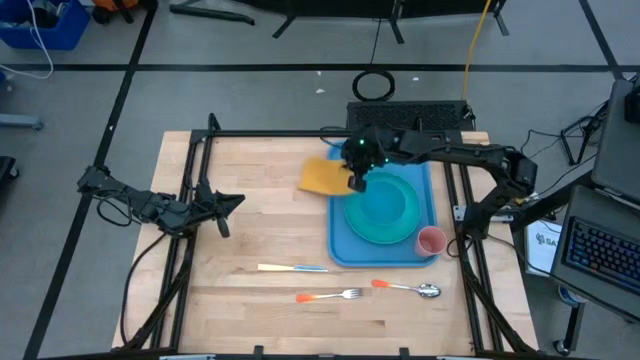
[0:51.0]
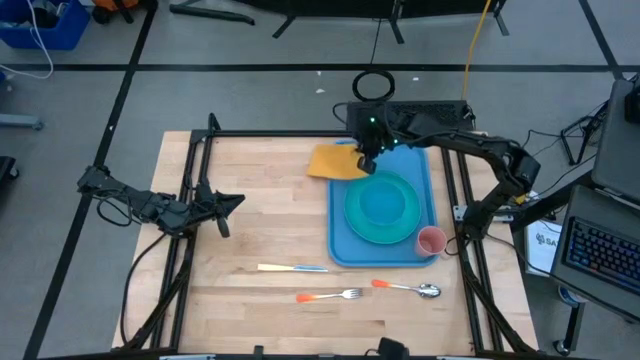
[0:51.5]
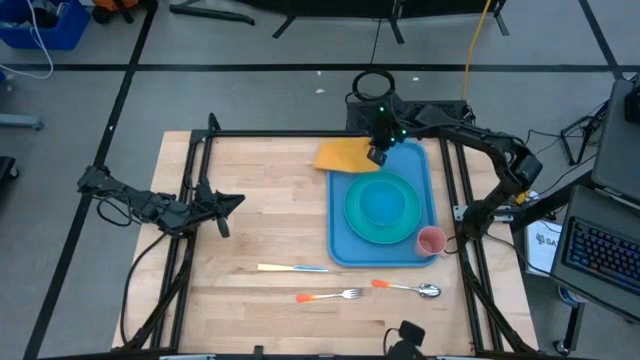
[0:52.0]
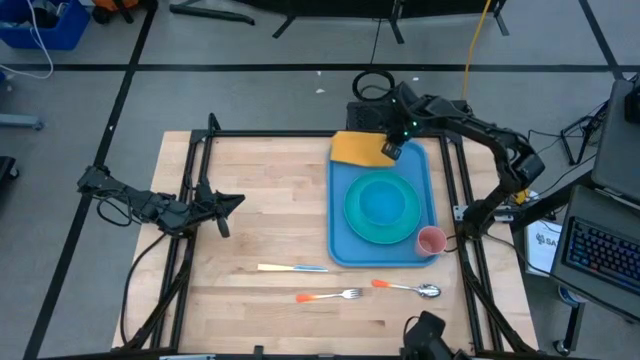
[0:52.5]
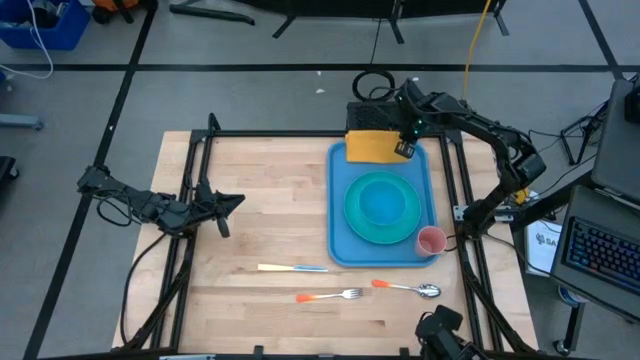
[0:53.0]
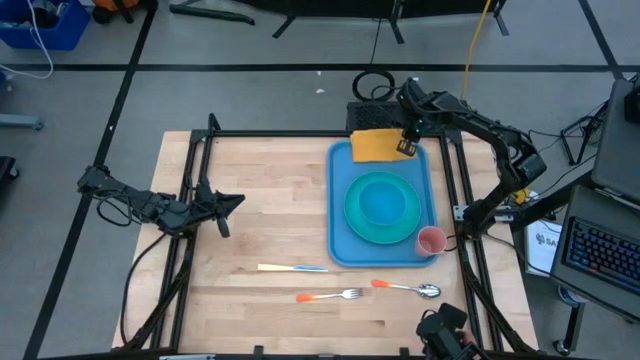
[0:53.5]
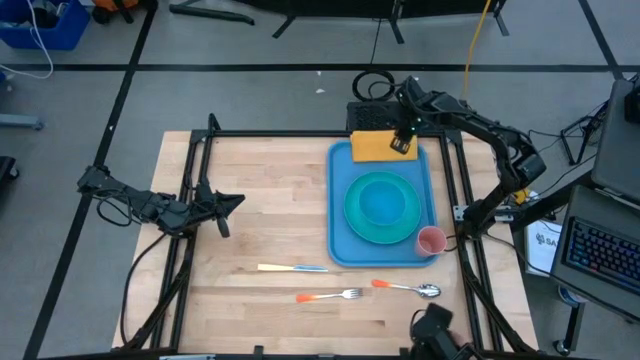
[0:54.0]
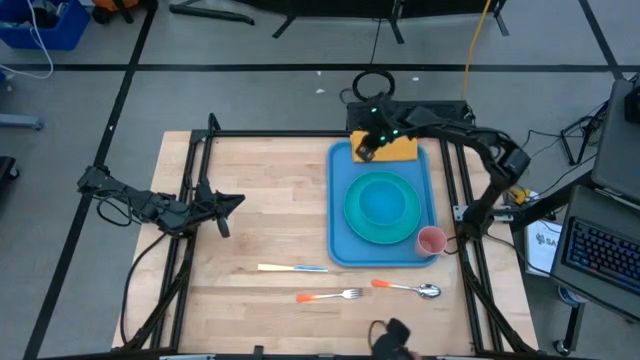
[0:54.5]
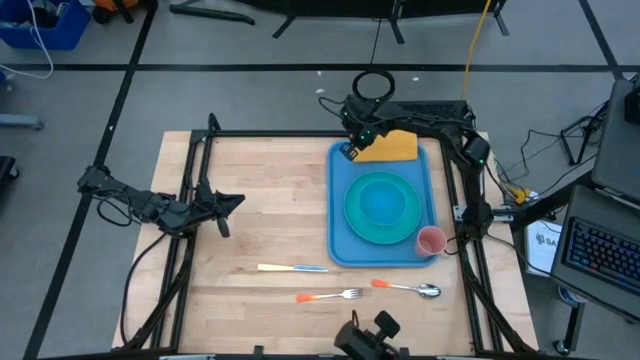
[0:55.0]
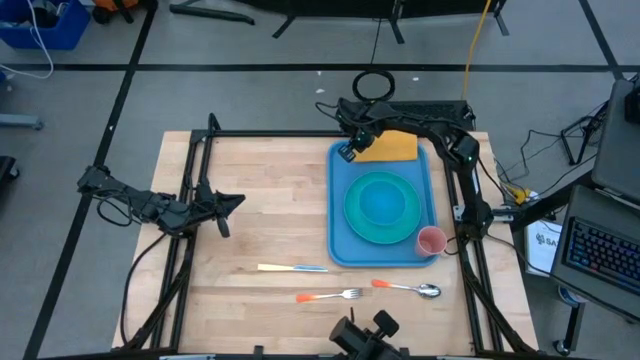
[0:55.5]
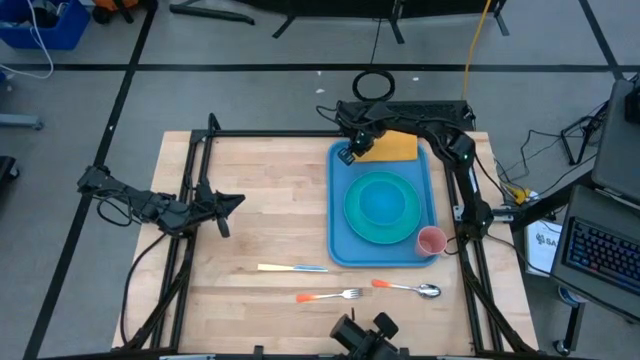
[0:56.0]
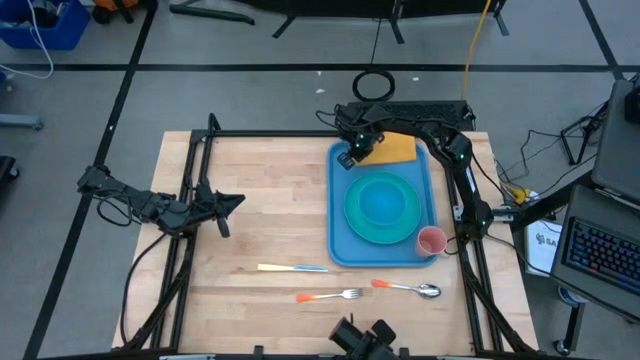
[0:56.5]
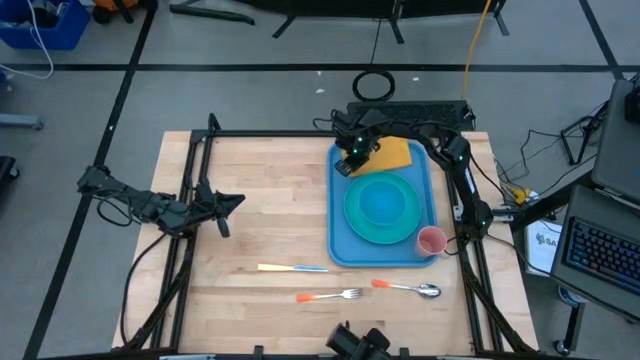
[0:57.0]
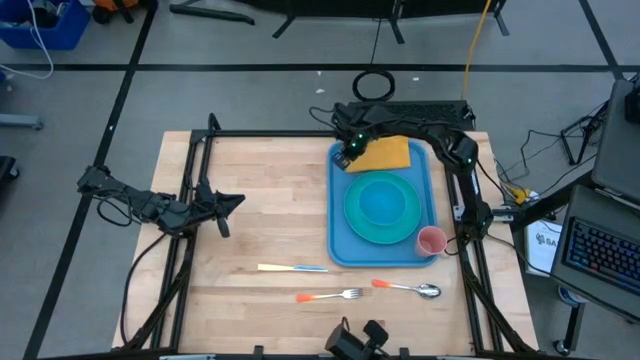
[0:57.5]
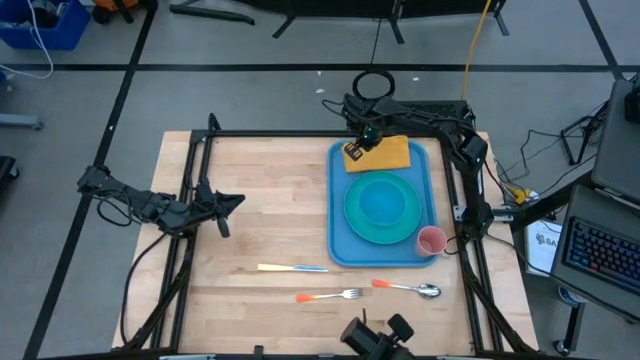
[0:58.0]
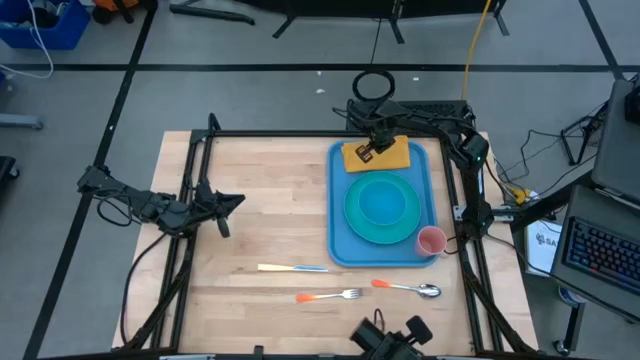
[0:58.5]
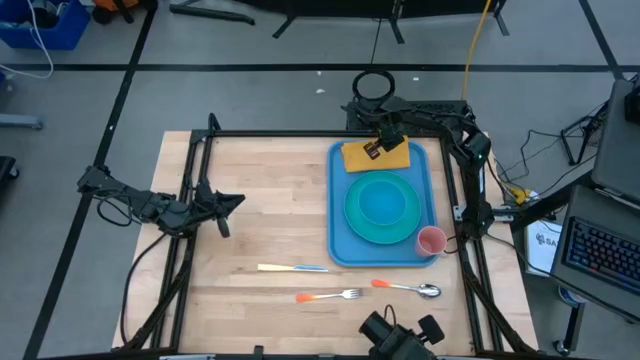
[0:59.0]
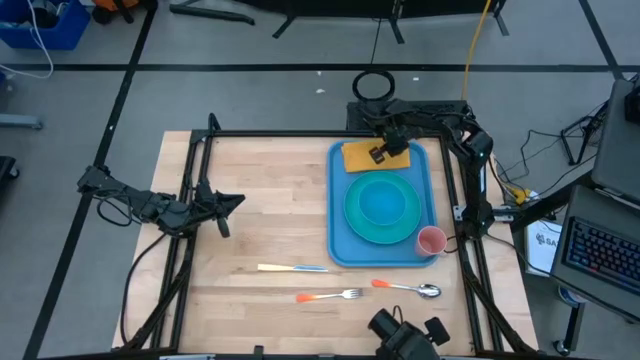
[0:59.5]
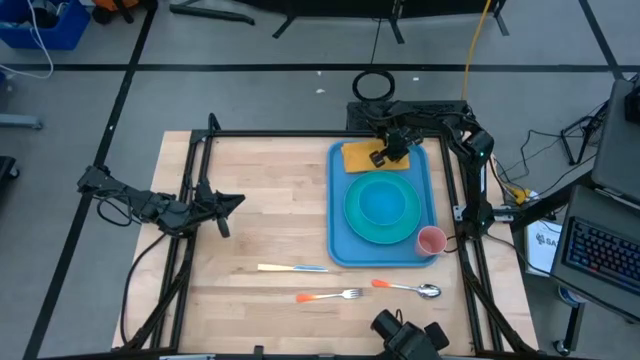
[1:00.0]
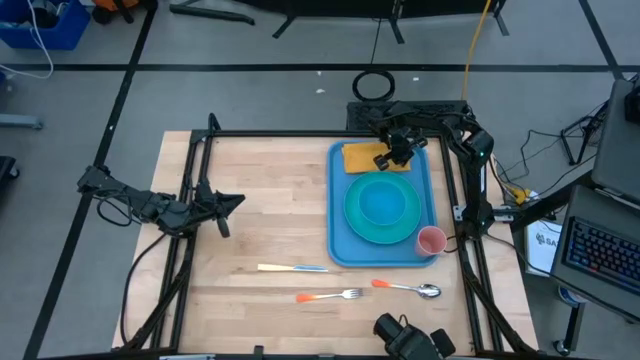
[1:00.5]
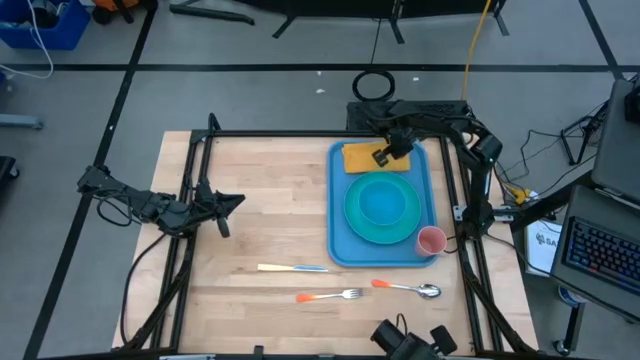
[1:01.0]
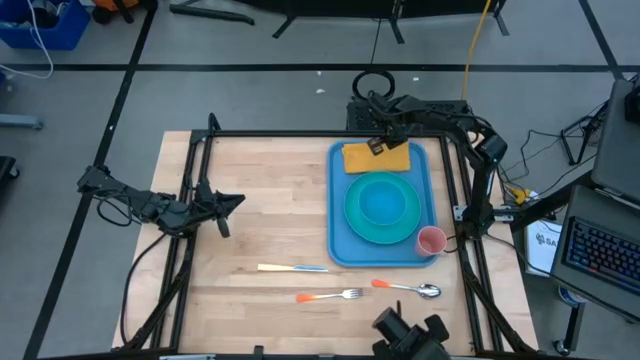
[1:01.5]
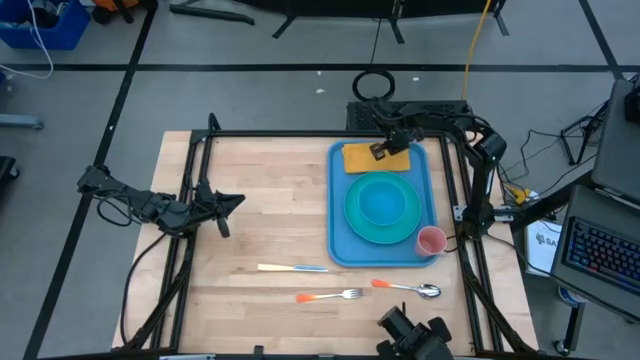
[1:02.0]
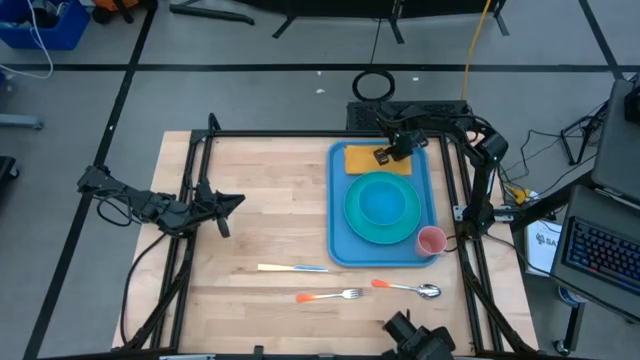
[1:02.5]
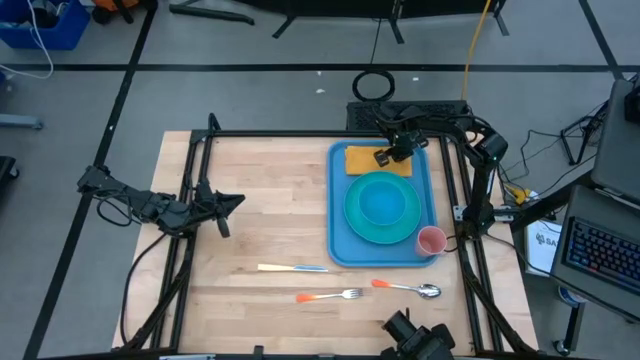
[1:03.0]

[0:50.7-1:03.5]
Task: Set up tray
Put the yellow table napkin to the left of the green plate on the blue serving tray

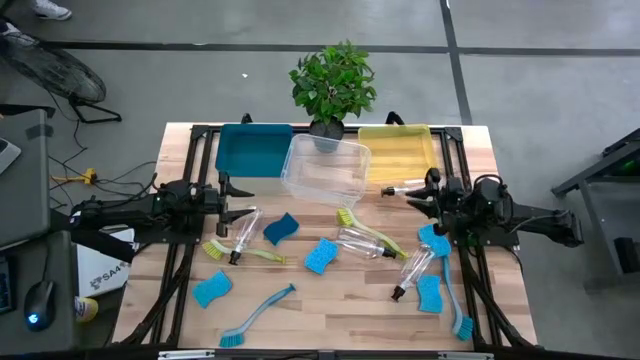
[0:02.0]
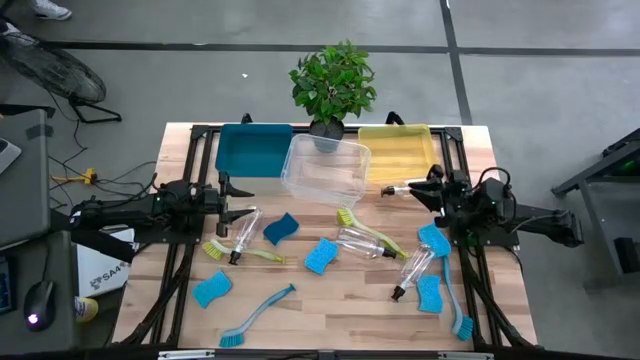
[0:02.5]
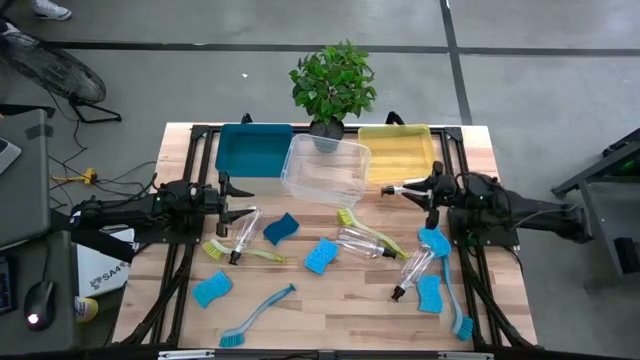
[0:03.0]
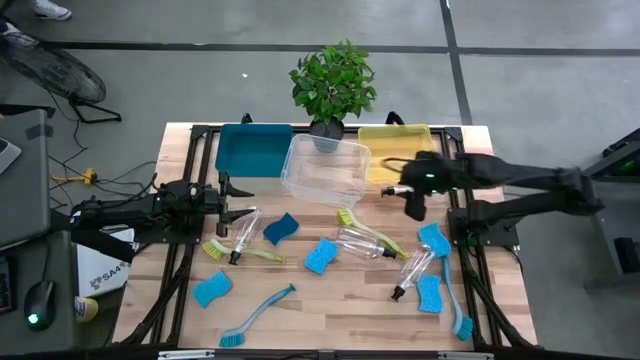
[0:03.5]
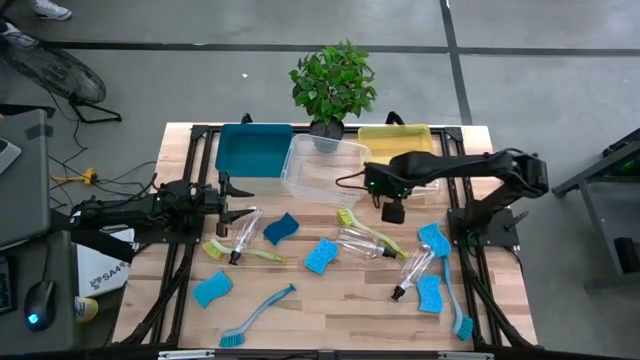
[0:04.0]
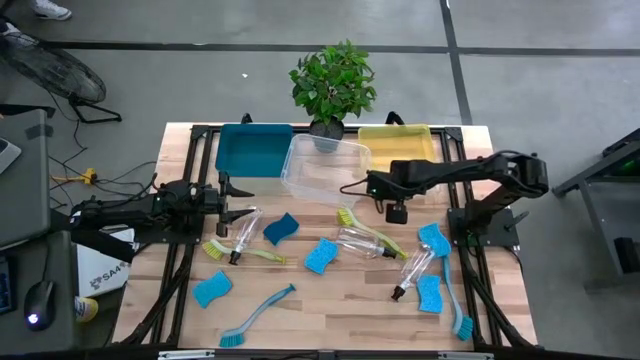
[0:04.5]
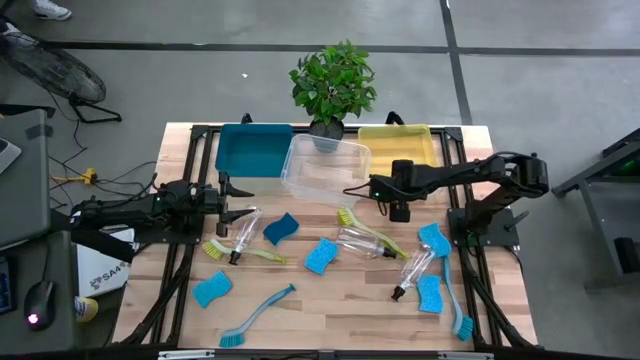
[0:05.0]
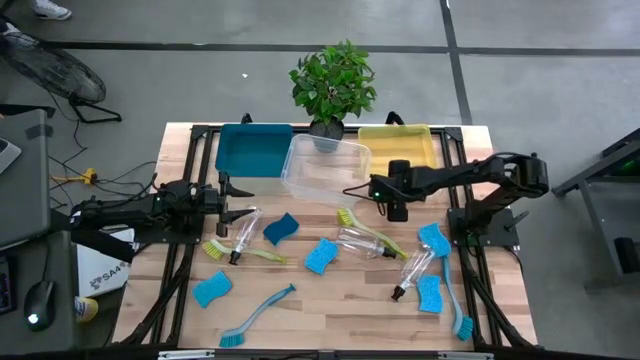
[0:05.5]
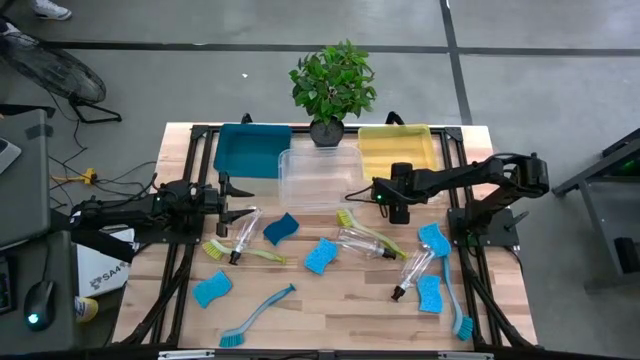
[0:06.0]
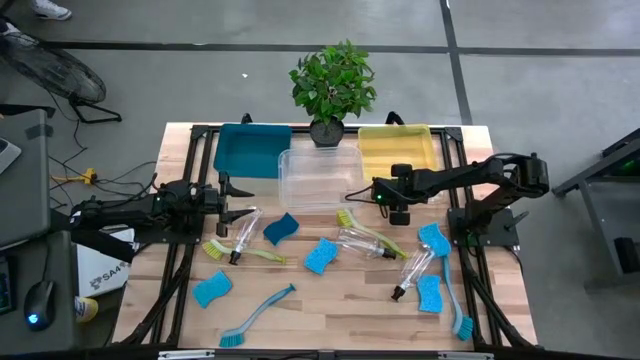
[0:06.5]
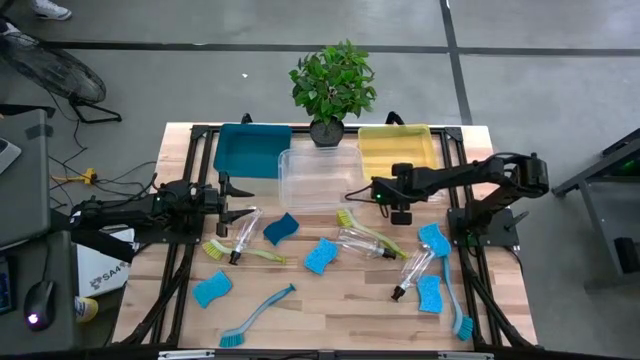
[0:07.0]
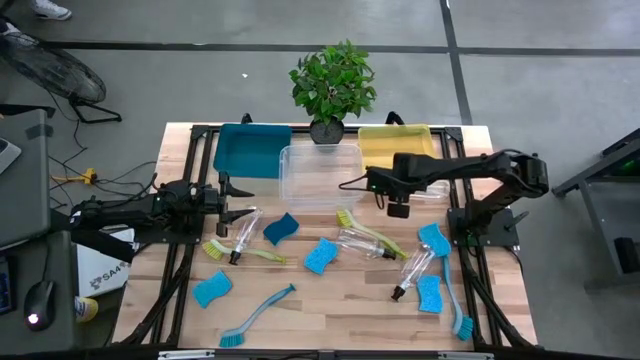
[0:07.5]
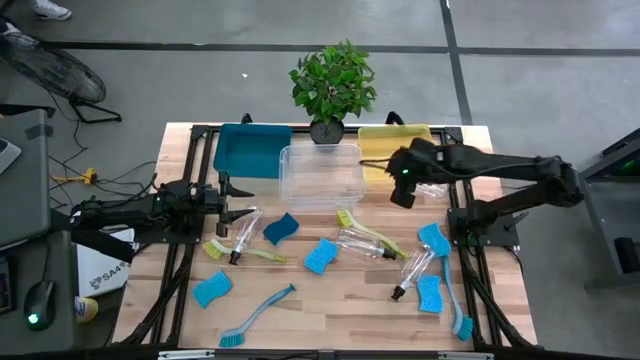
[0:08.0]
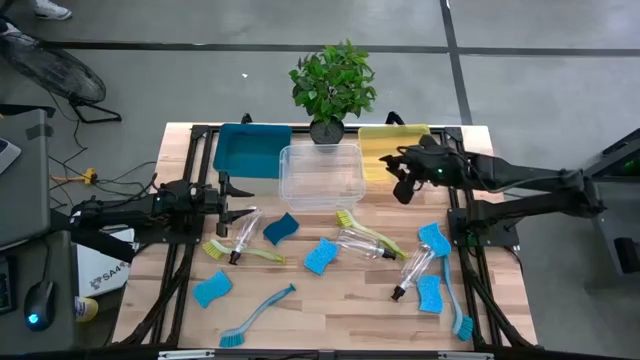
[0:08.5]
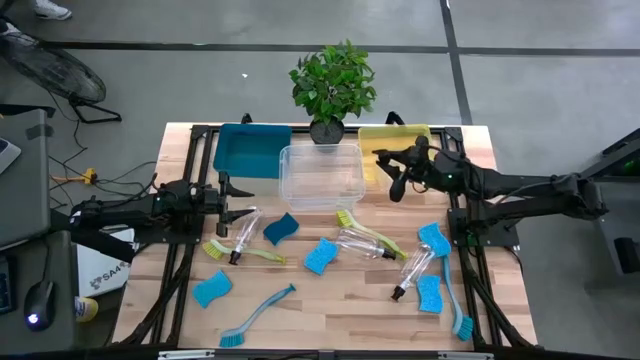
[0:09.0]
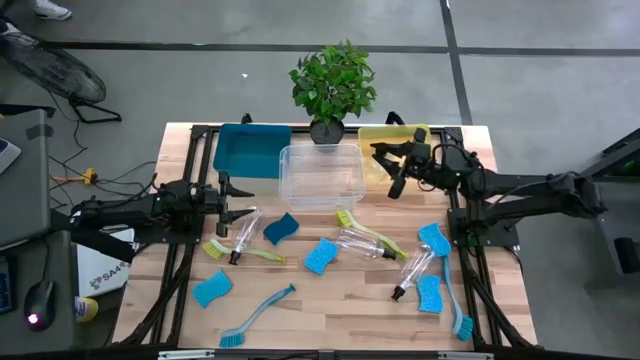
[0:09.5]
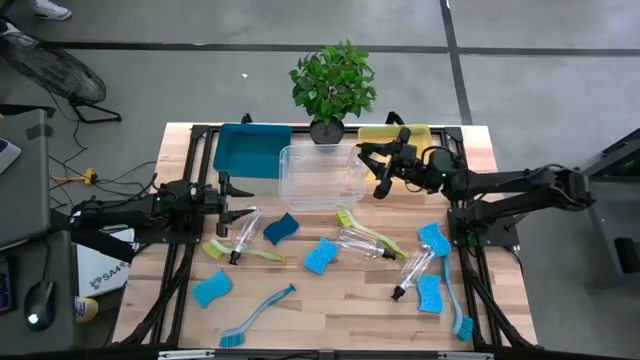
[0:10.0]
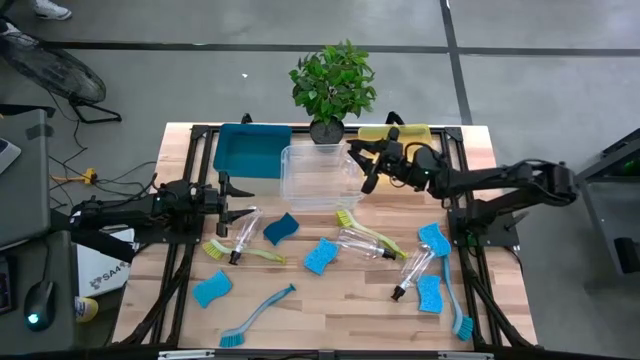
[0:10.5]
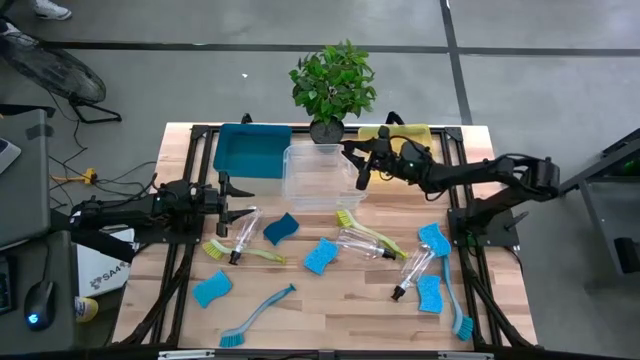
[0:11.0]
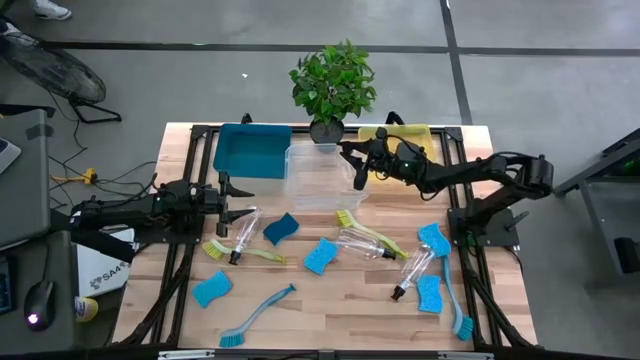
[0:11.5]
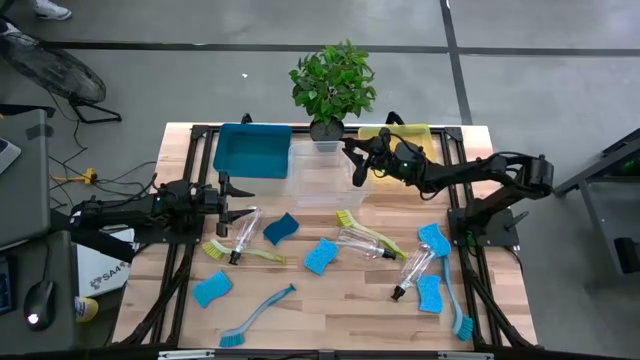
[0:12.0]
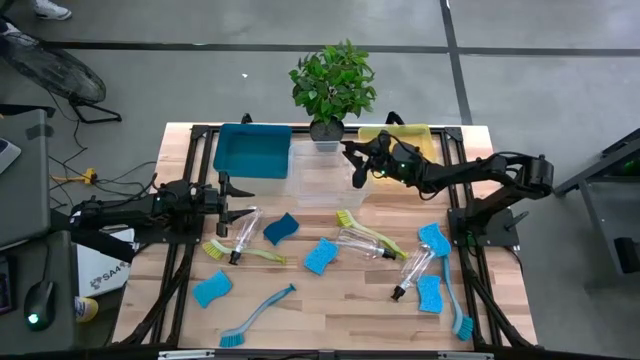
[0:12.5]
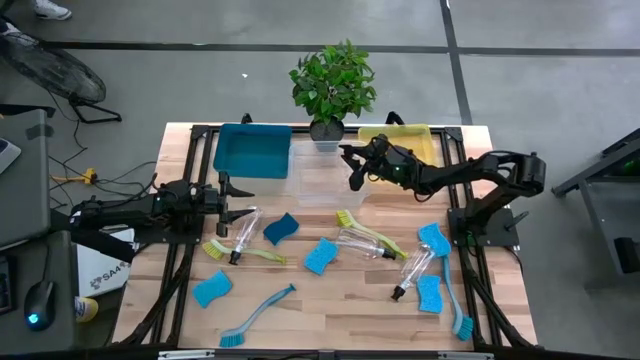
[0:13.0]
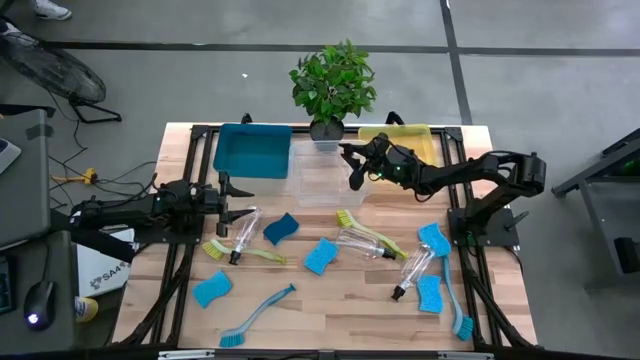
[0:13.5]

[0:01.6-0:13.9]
Task: Pick & Place Kitchen Sink Supplies
Put the transparent soap dispenser into the transparent bin
